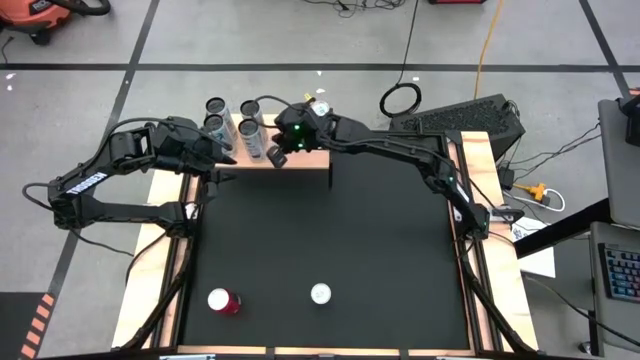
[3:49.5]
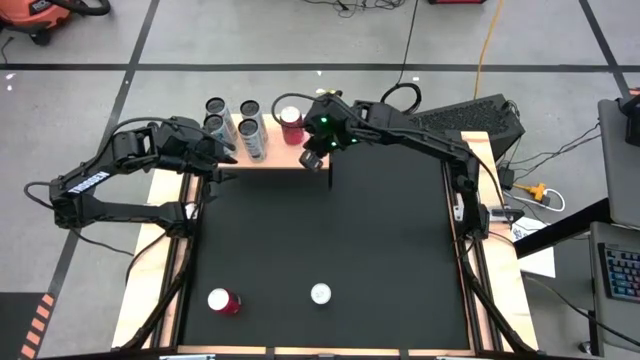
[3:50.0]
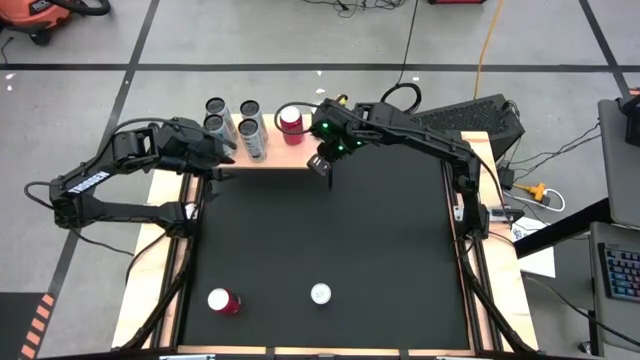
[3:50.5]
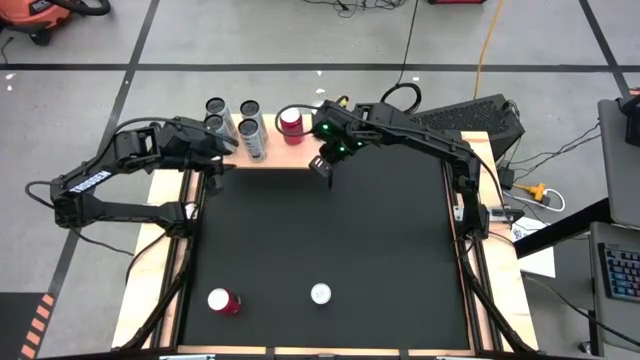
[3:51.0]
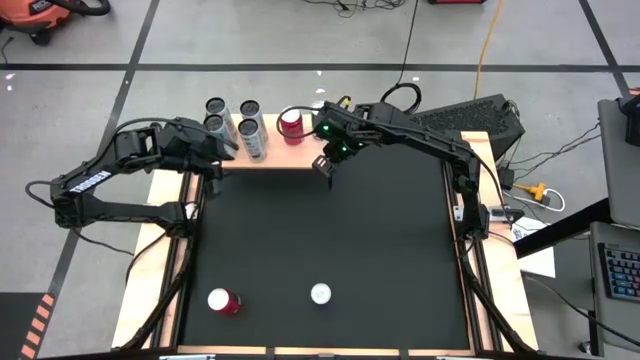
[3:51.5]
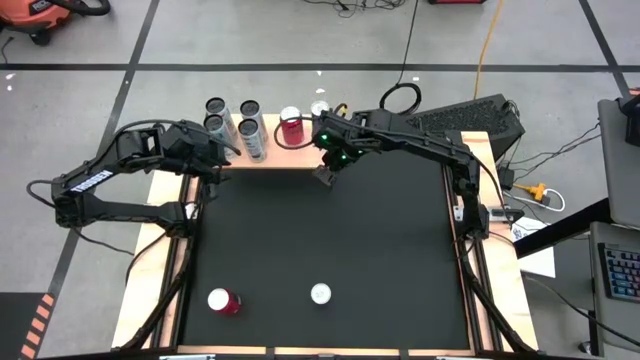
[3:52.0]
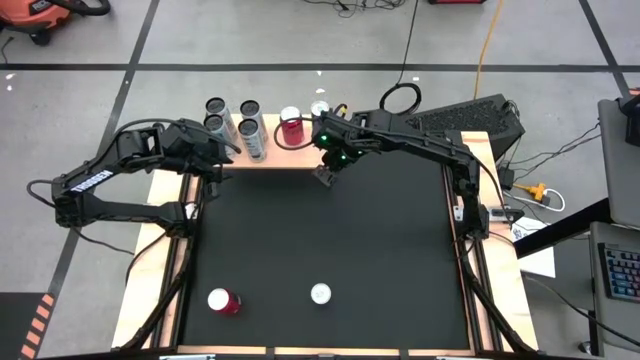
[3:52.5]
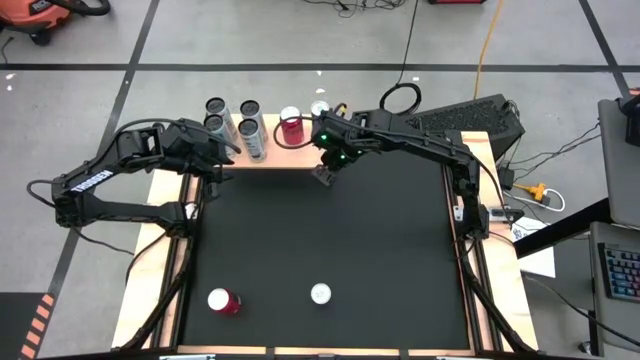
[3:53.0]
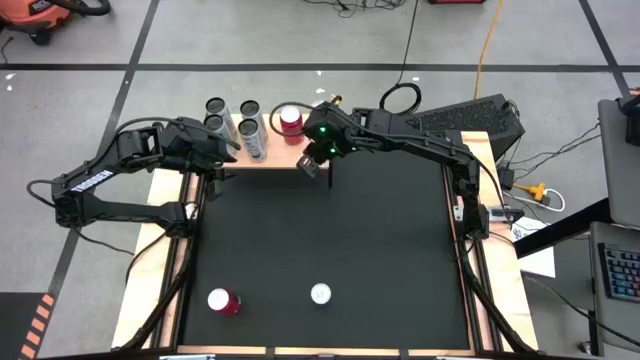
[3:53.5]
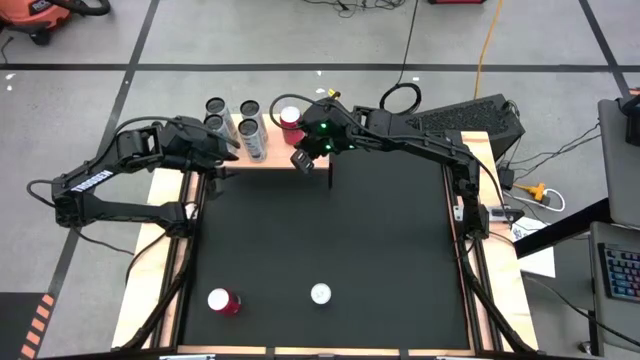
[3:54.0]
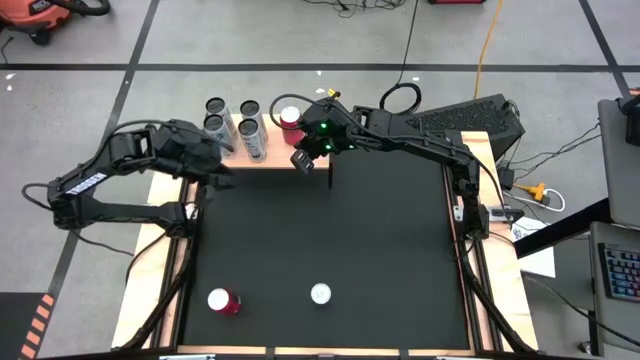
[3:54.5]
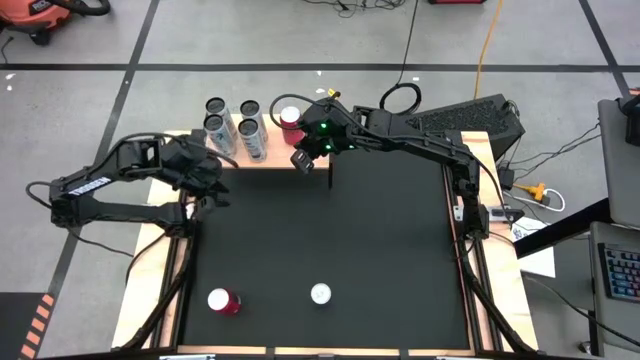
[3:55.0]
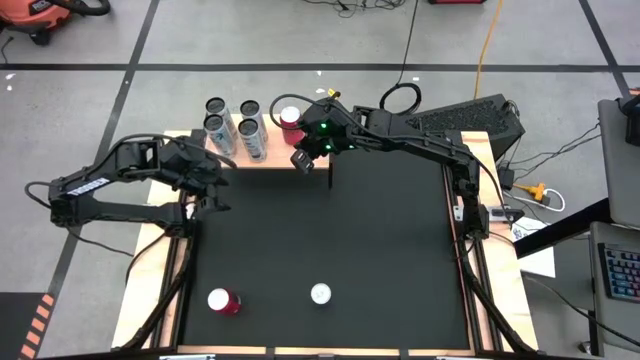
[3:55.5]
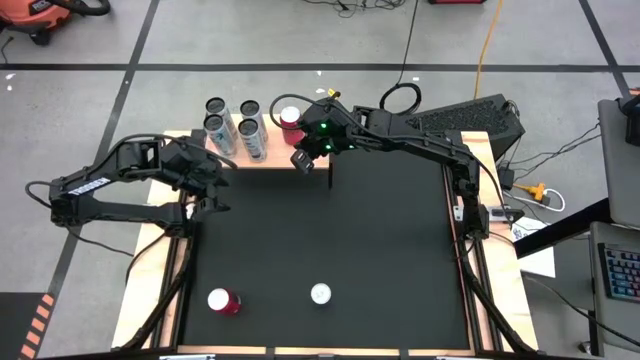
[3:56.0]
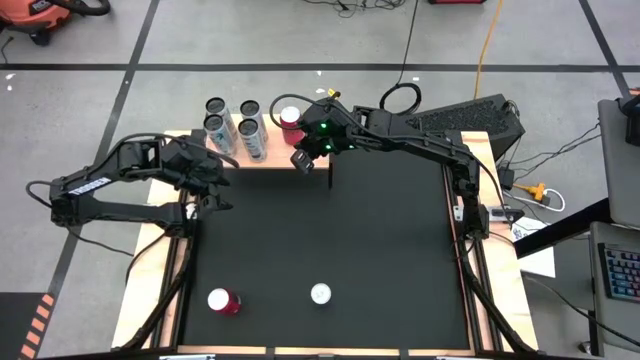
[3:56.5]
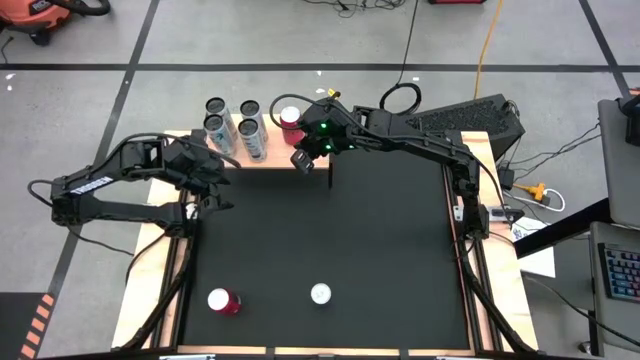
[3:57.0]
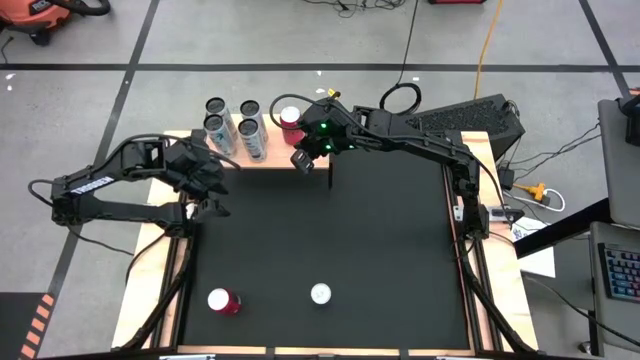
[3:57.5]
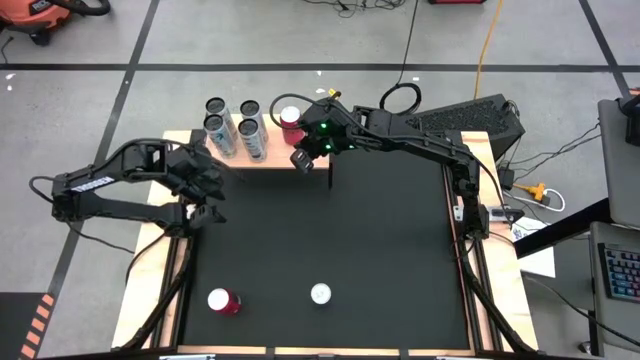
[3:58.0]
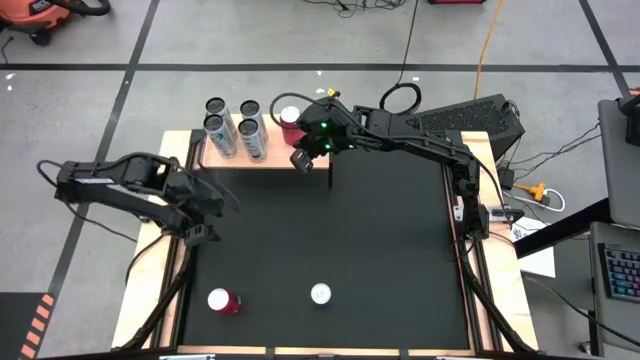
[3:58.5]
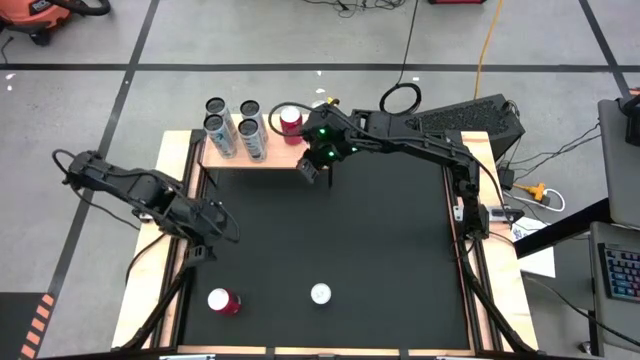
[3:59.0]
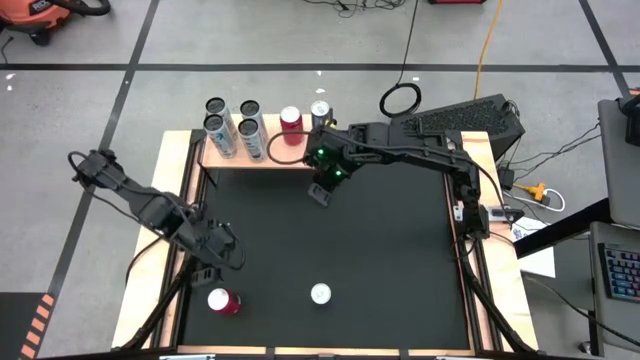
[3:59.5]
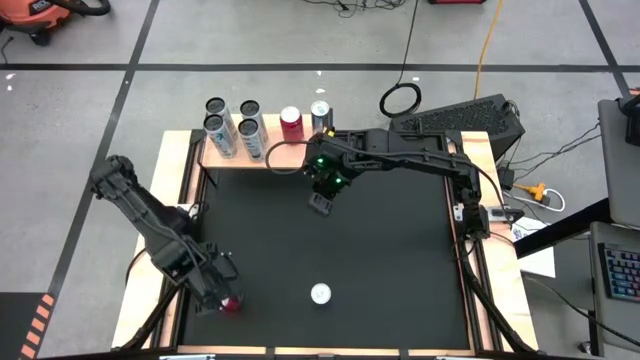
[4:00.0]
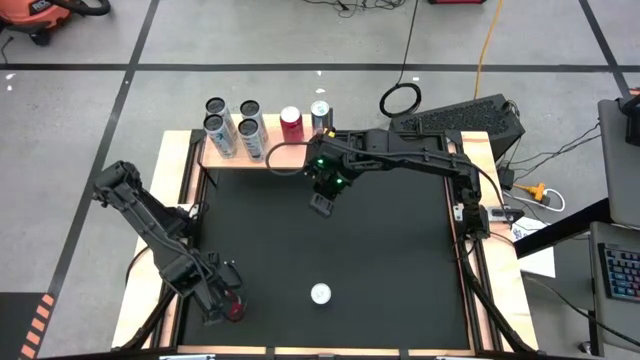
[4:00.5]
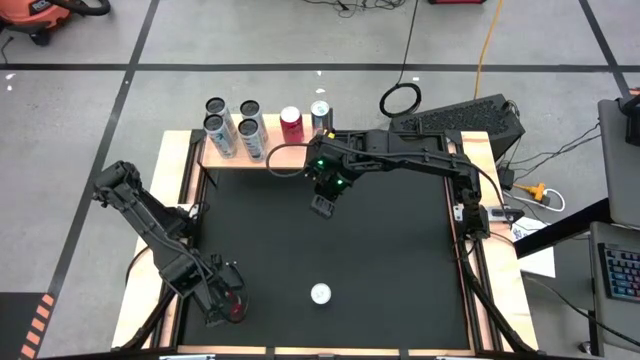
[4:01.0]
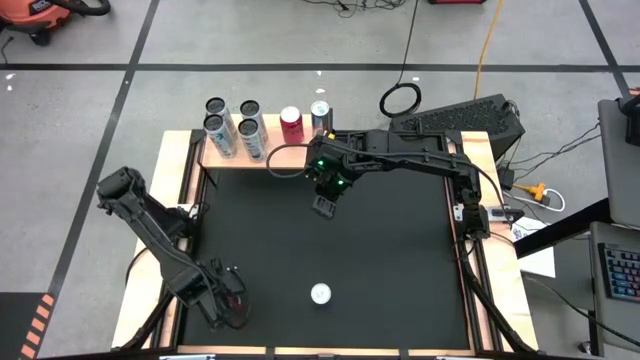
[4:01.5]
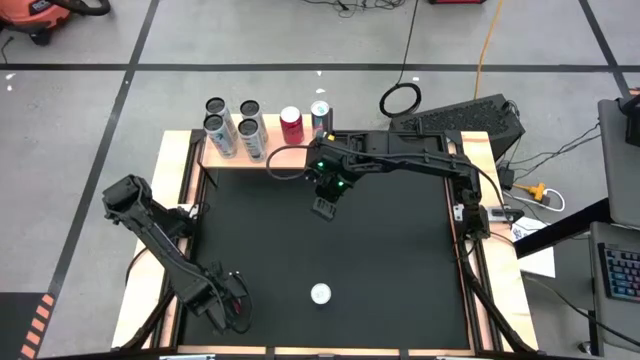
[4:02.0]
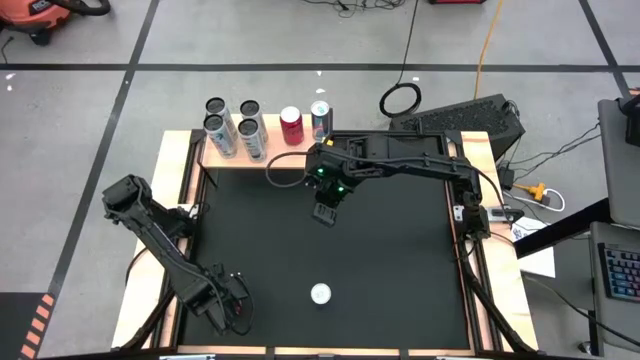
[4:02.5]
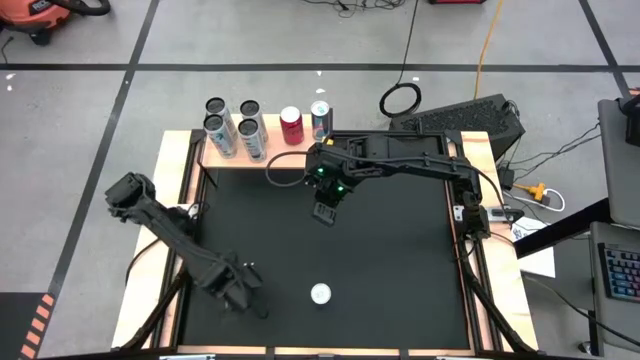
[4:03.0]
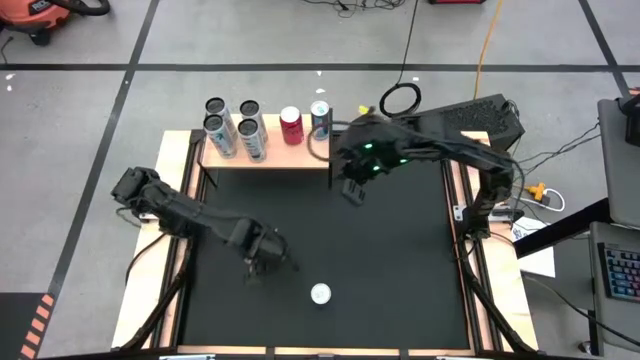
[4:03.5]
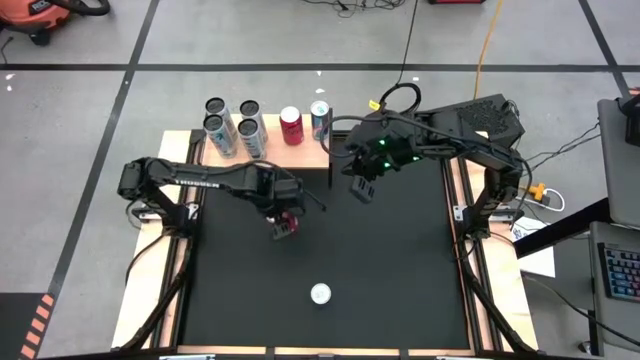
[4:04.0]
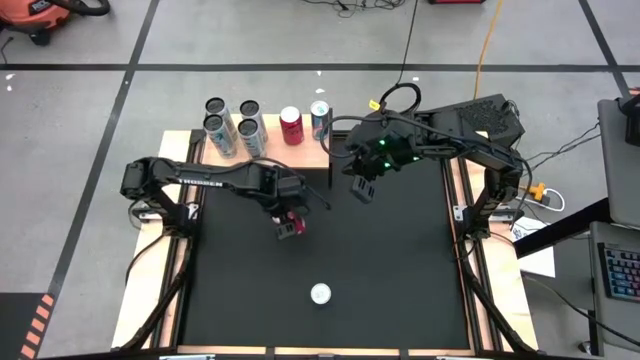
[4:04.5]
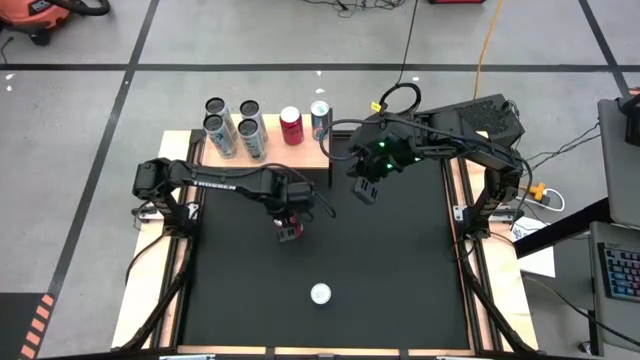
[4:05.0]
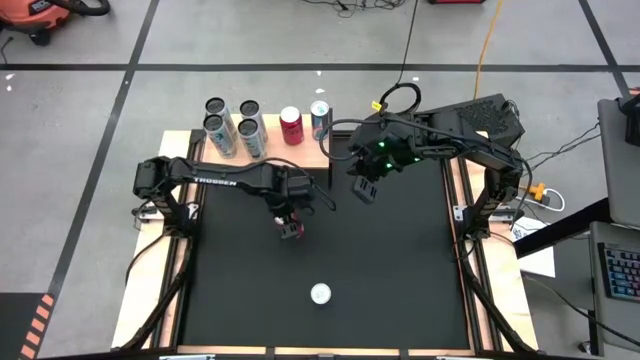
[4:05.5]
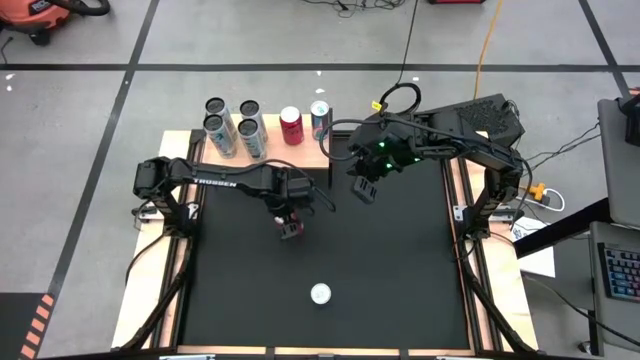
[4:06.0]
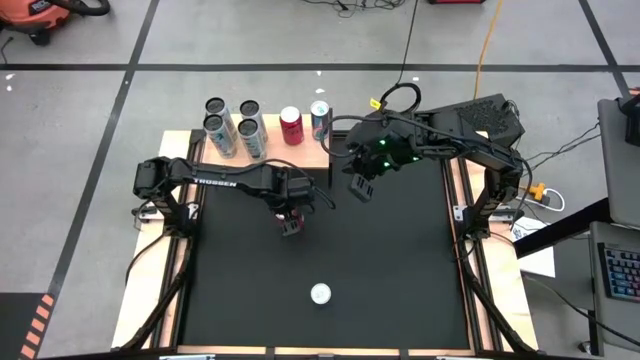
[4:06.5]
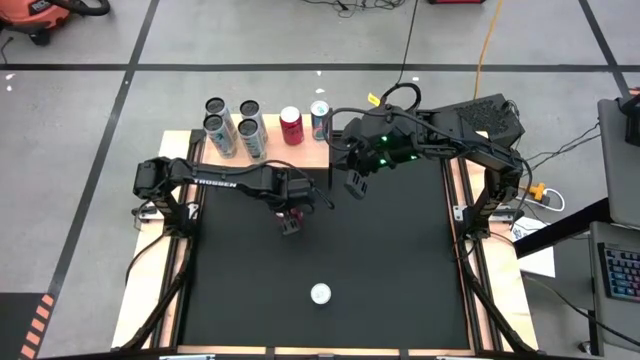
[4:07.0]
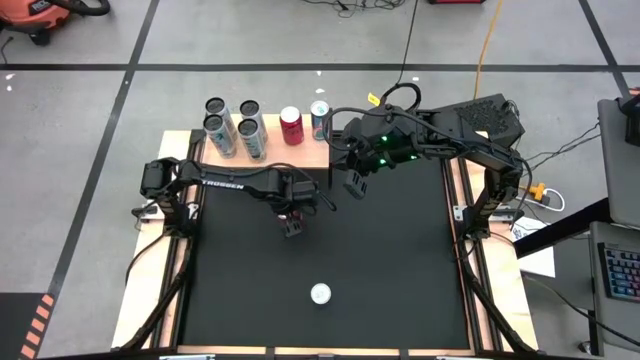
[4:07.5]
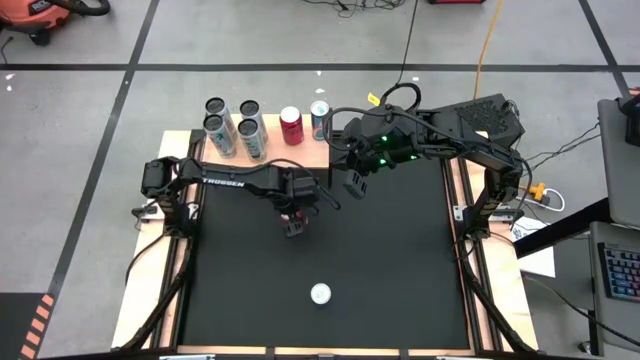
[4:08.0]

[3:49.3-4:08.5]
Task: Place canned beverage on shelf
Put the red black soda can aligned with the red black soda can on the shelf

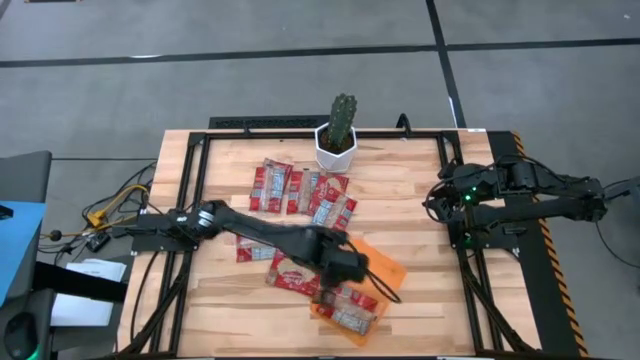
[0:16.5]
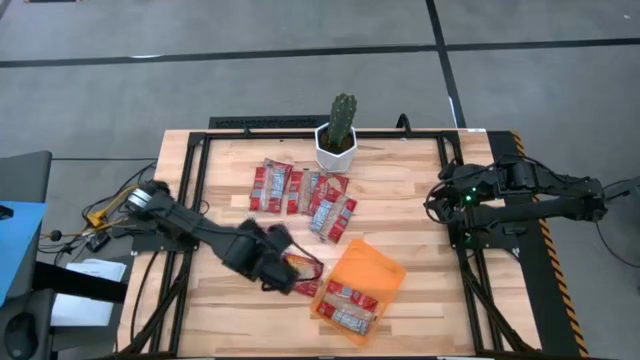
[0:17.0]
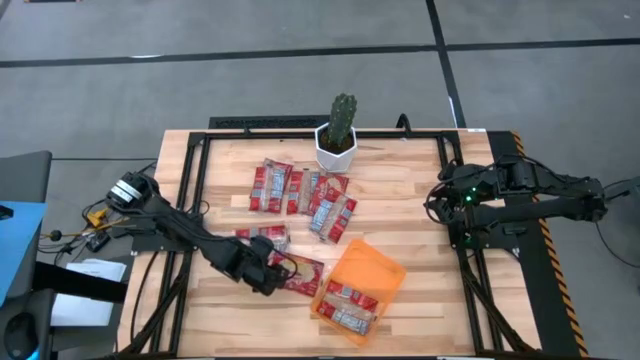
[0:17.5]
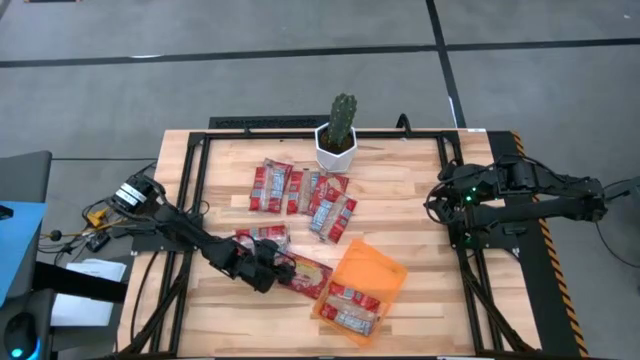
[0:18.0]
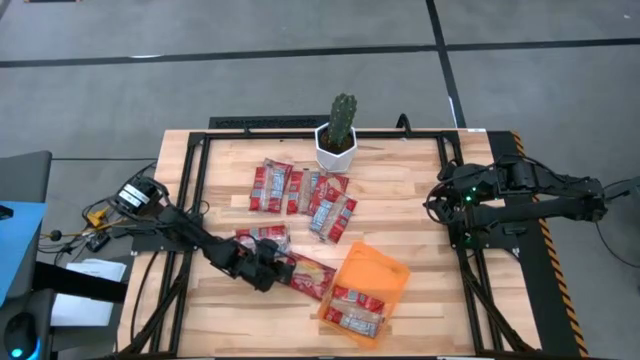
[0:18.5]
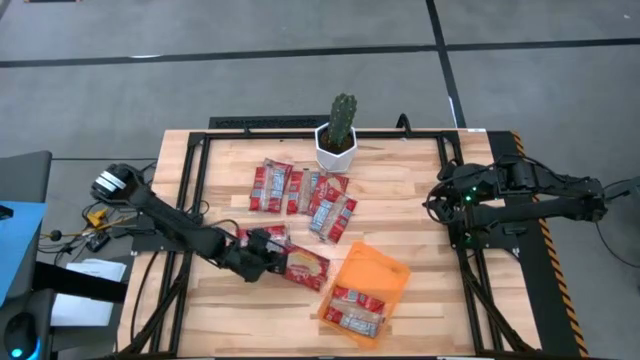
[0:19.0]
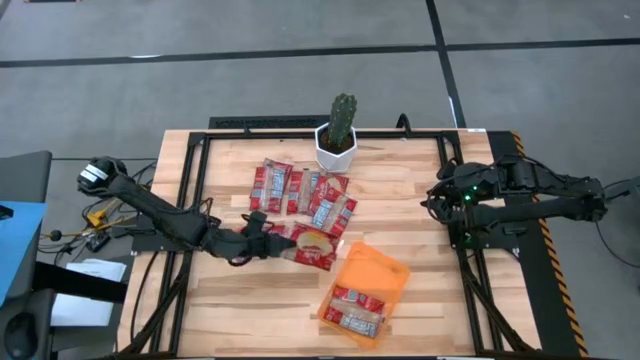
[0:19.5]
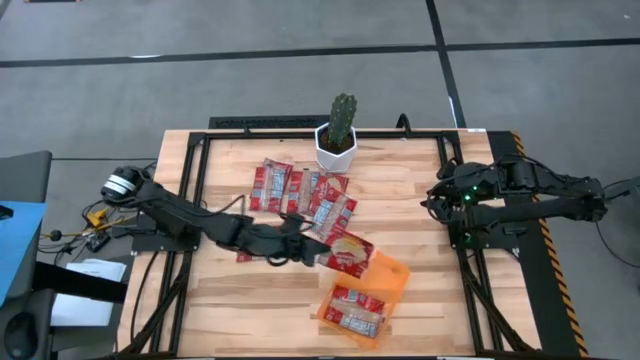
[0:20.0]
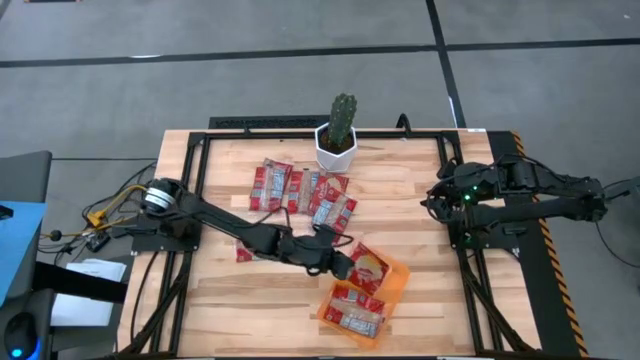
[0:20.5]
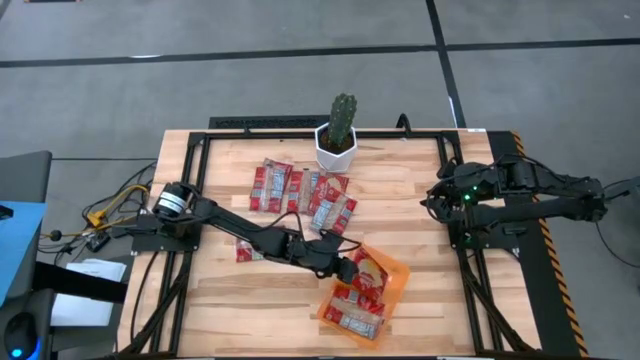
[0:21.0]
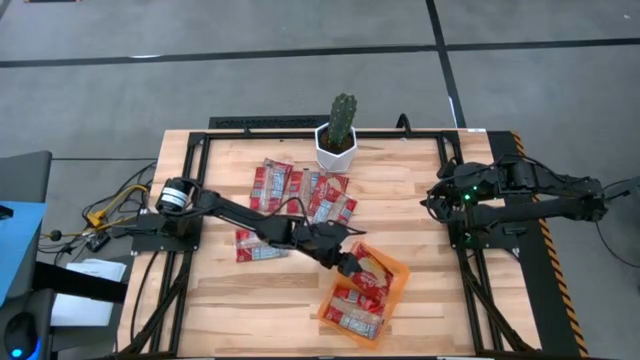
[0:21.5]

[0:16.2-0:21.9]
Task: Sort popcorn bags into baskets
Put the red popcorn bag into the orange container
